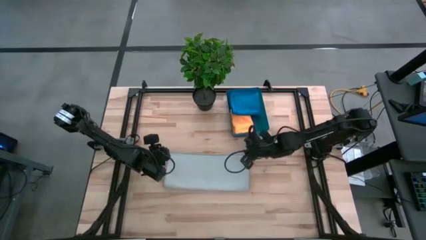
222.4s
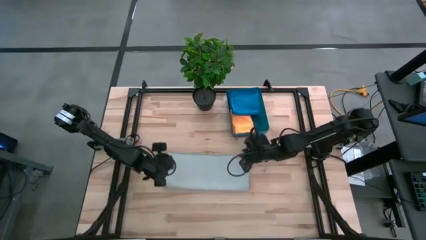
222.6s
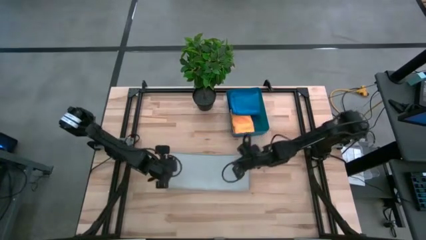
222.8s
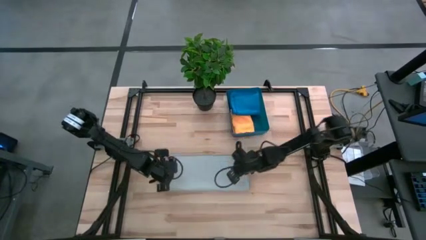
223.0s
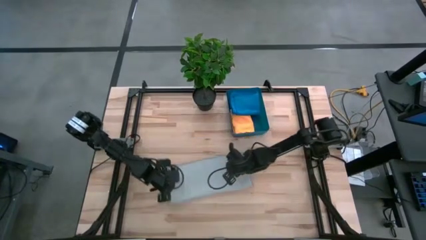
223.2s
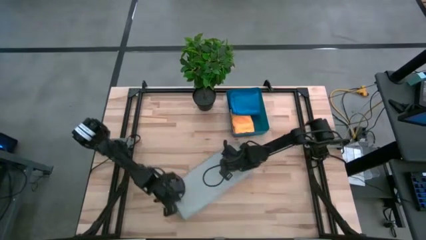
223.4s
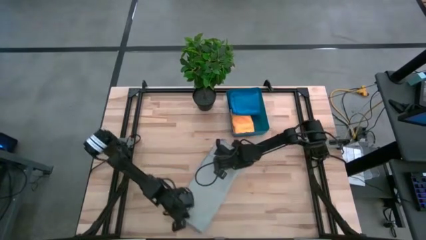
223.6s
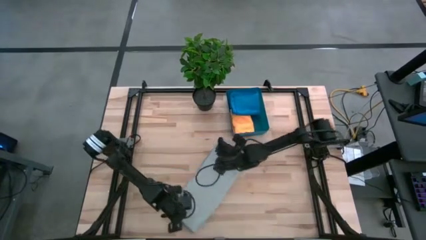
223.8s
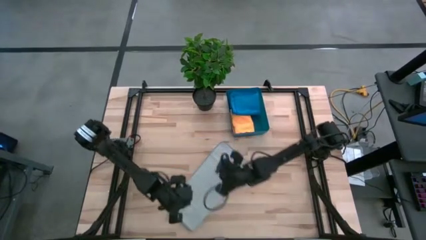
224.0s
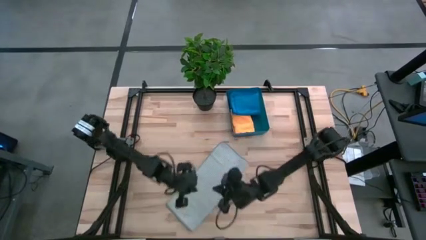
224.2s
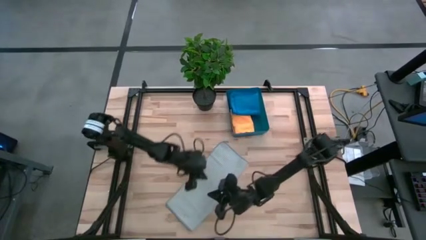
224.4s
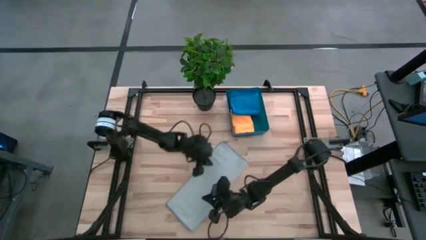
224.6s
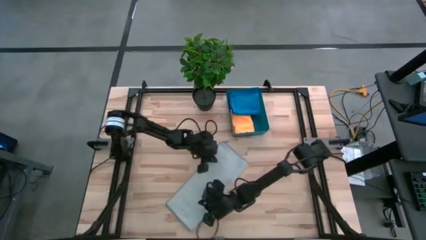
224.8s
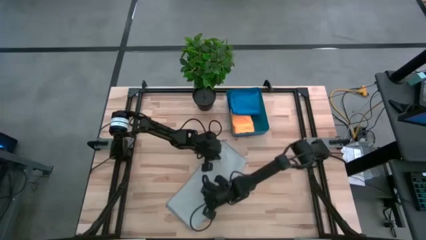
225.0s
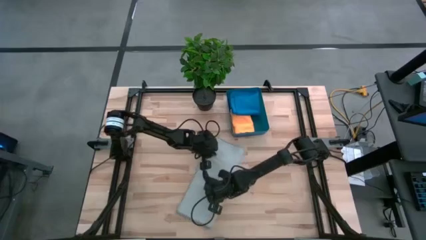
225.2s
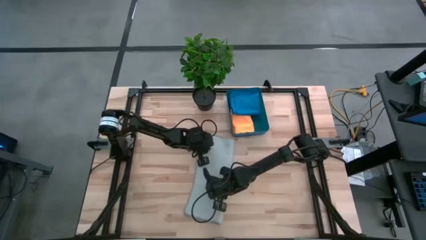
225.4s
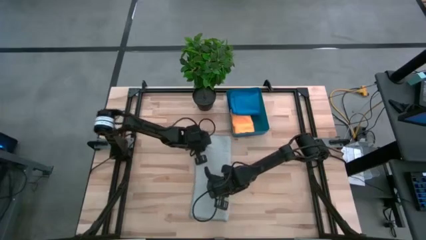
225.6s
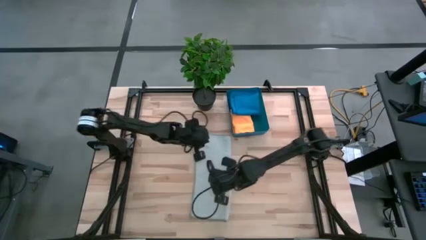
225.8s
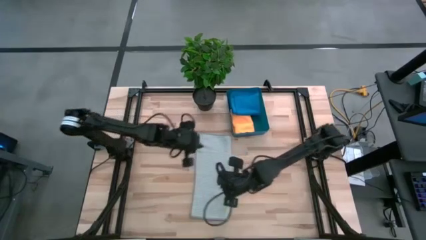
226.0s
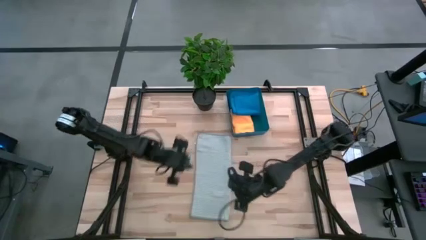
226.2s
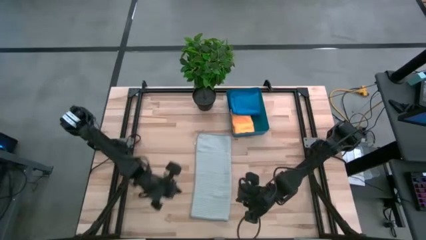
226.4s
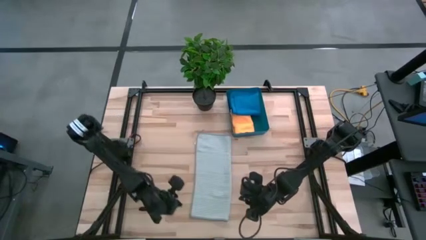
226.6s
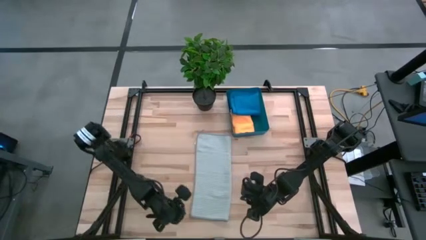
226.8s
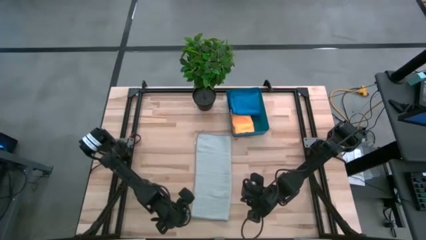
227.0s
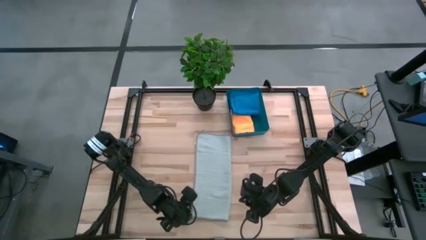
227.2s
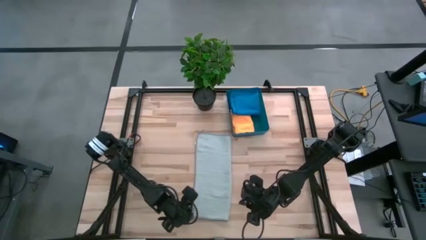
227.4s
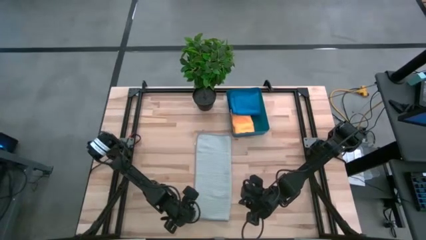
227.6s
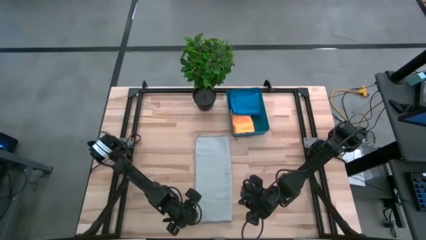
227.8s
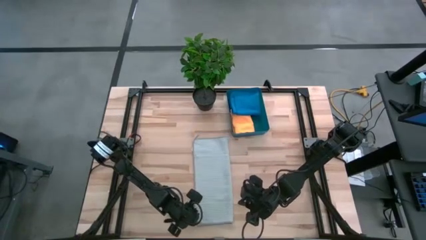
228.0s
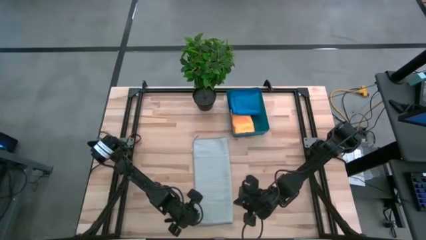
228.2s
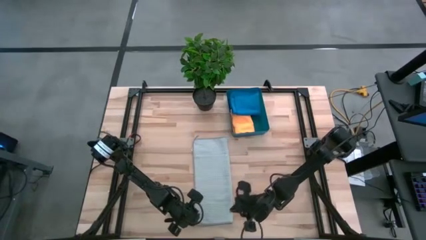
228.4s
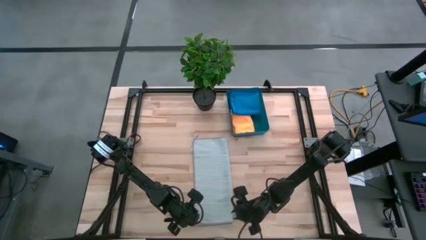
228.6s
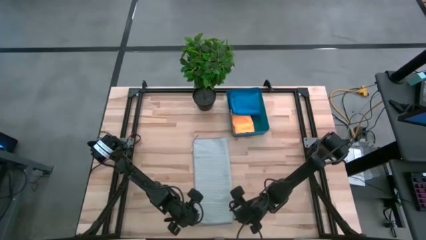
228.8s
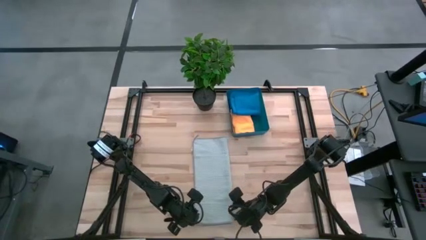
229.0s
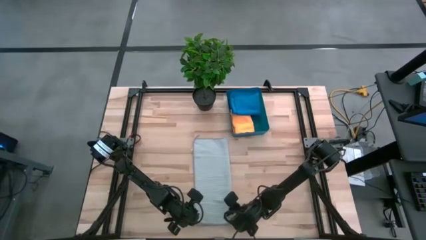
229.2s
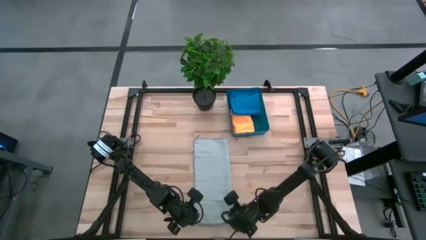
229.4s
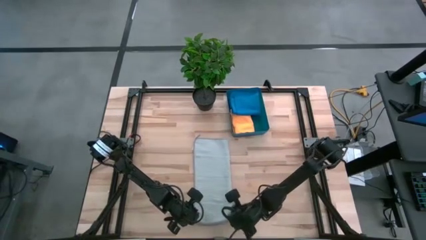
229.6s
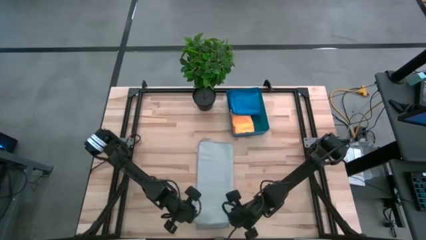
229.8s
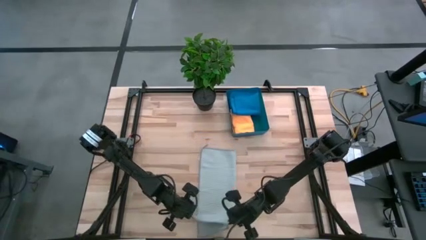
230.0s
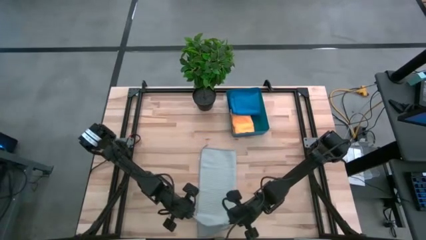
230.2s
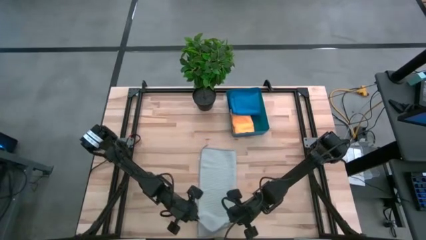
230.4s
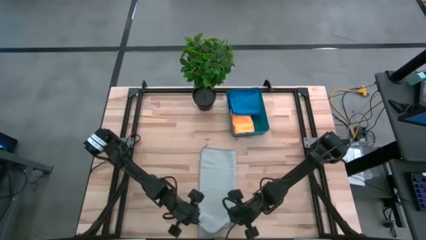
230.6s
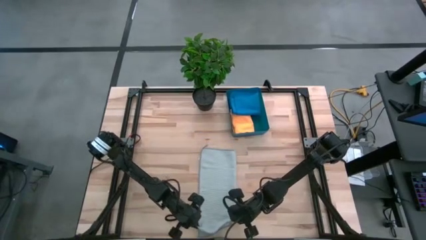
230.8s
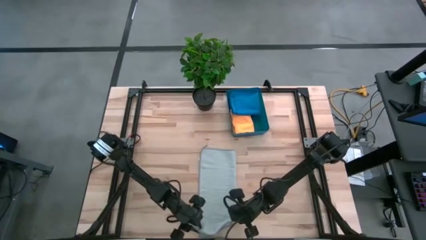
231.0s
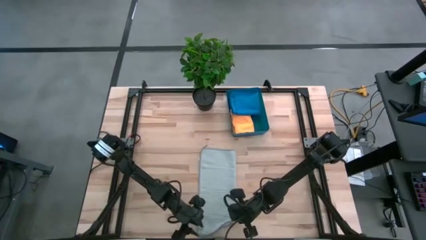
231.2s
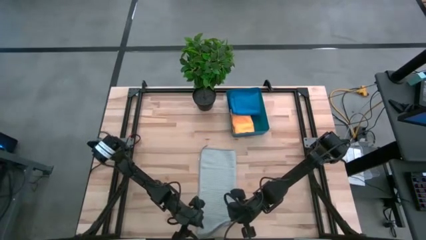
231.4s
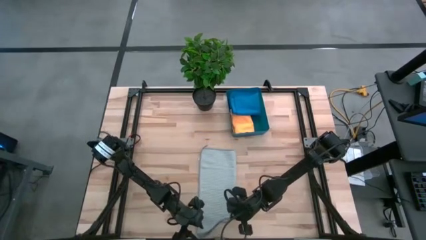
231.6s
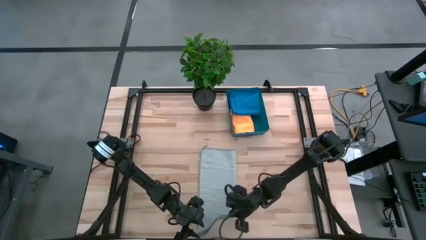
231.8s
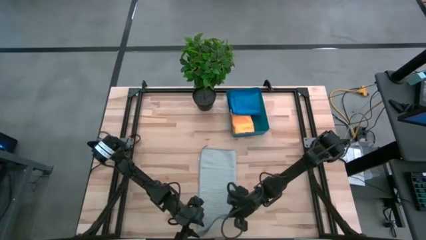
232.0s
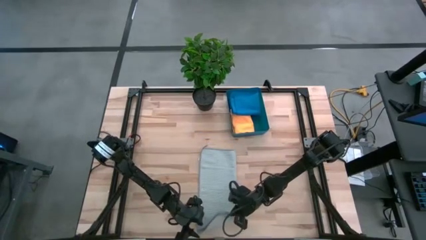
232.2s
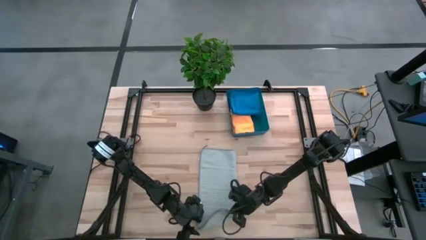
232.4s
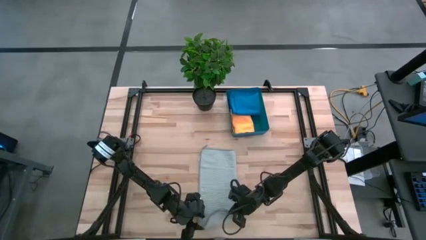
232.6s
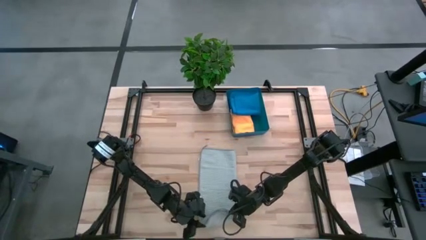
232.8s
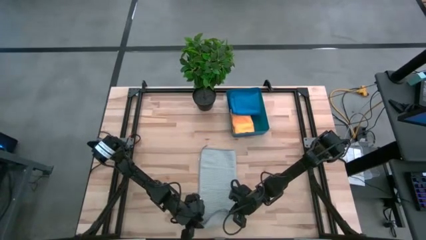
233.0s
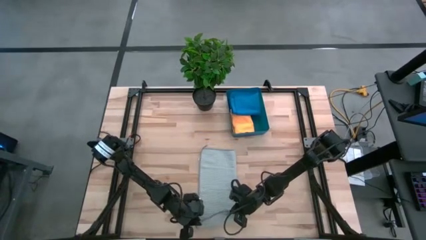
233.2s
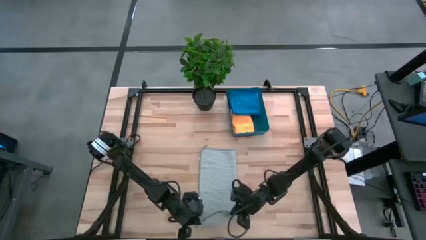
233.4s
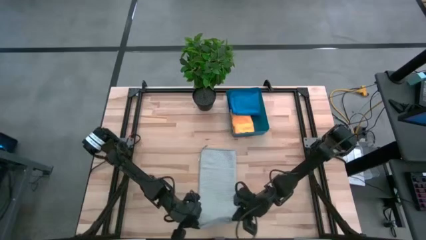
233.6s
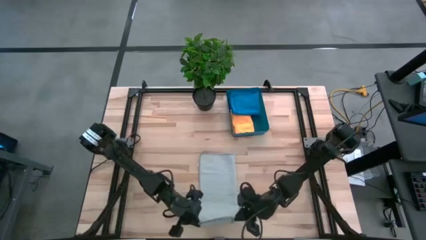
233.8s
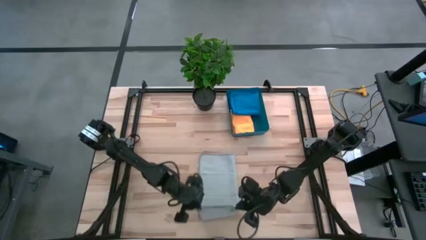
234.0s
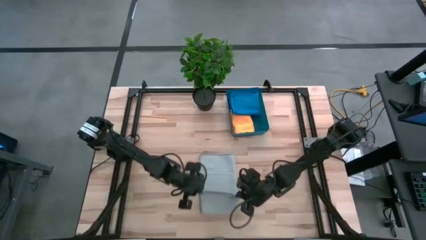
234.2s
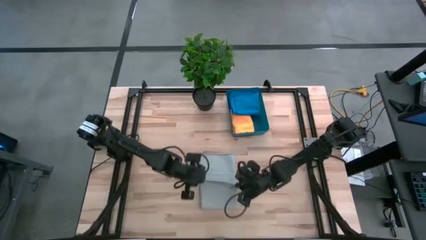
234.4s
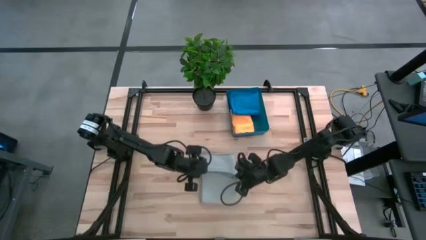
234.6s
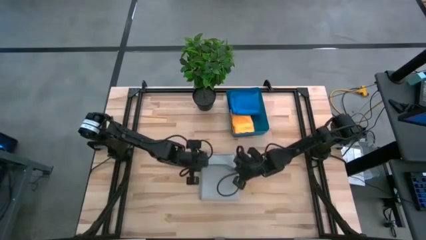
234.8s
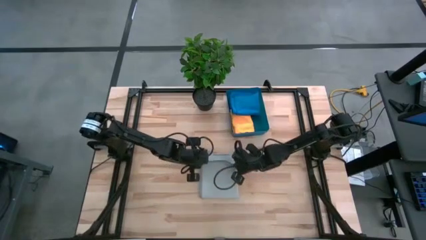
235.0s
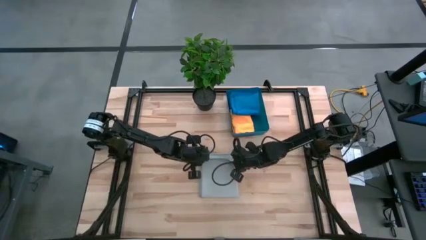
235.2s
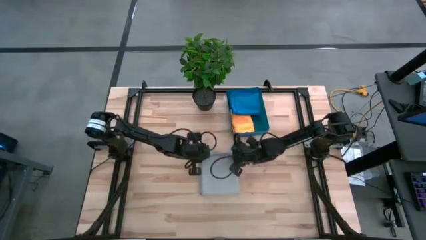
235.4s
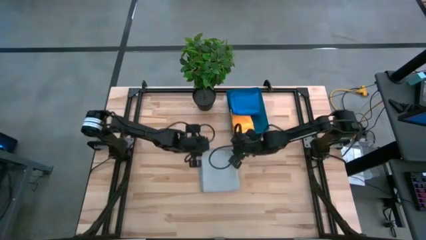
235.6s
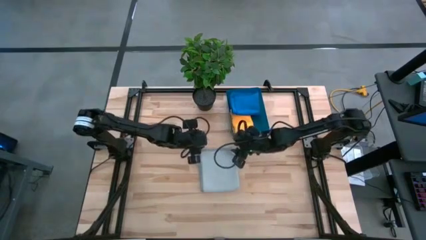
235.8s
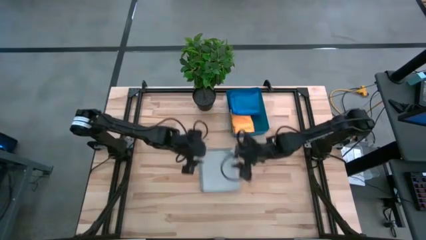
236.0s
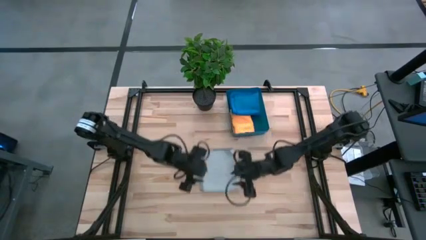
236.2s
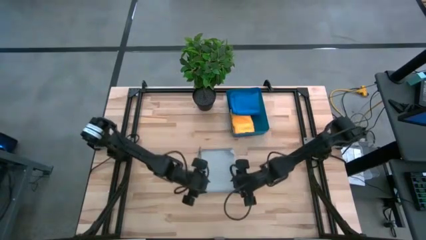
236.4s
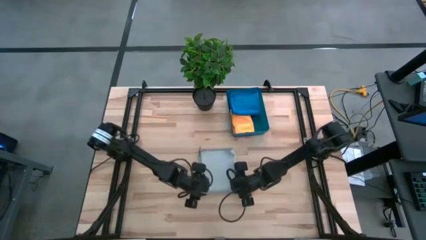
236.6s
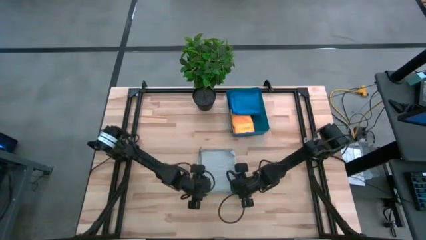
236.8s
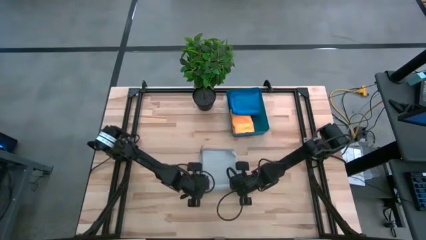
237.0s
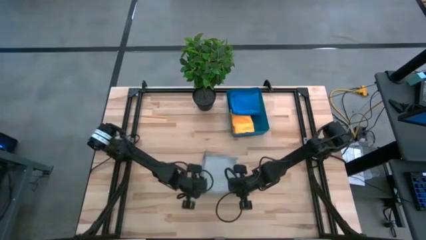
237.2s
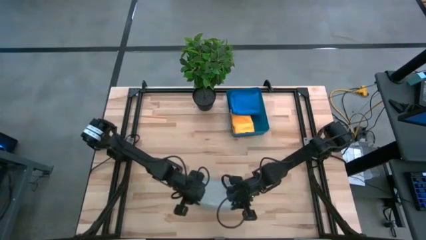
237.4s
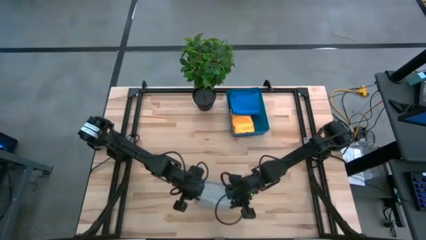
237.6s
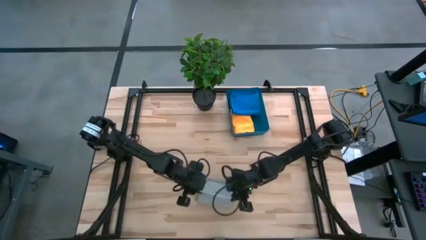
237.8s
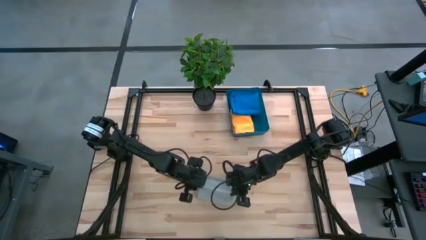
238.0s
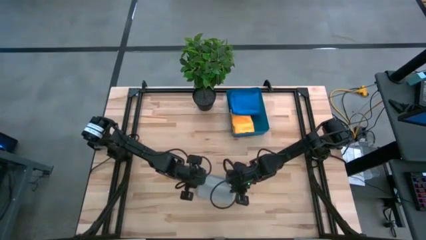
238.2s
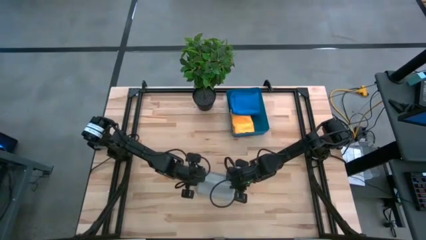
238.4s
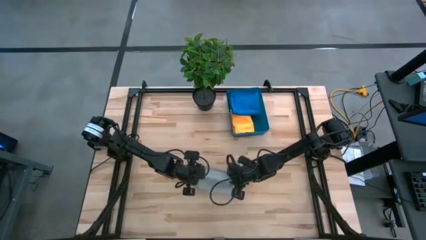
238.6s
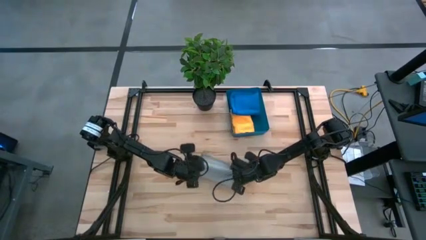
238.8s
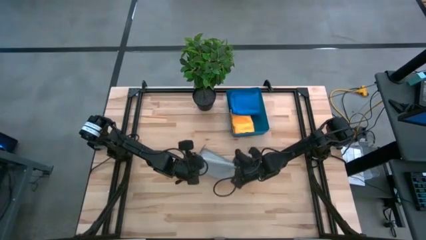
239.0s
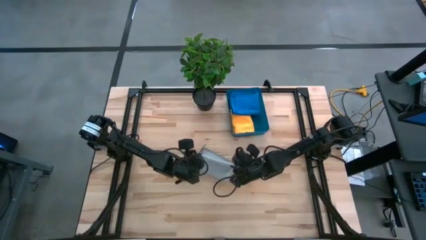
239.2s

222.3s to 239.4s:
Task: Fold microfiber towels
Fold the gray microfiber towel
